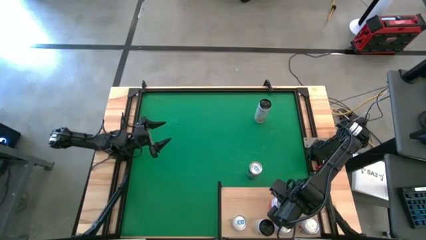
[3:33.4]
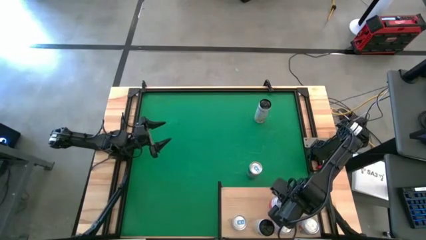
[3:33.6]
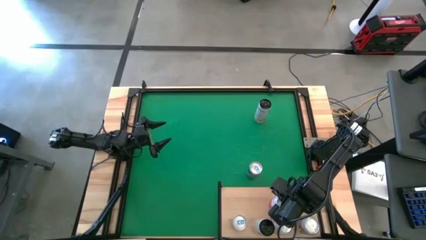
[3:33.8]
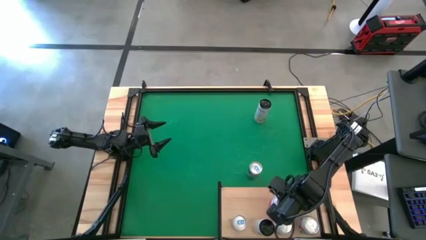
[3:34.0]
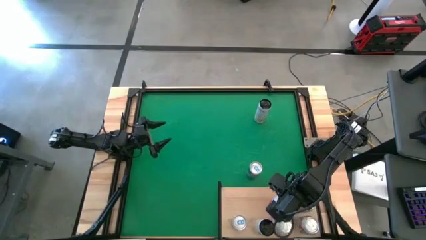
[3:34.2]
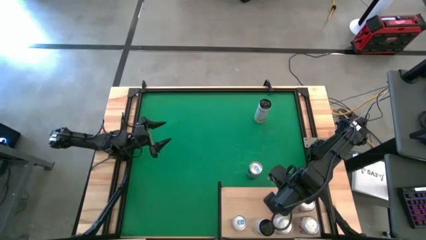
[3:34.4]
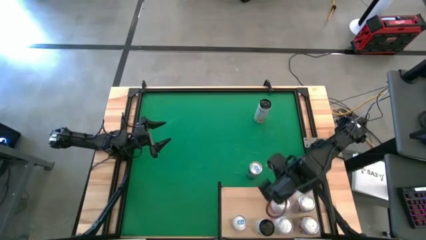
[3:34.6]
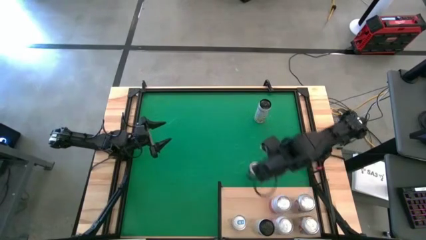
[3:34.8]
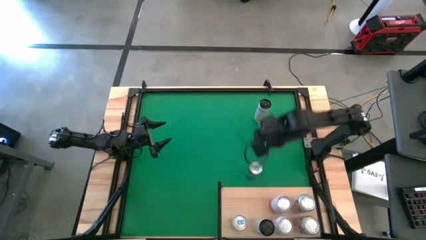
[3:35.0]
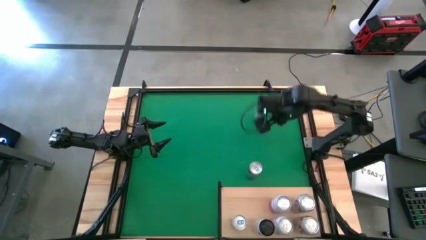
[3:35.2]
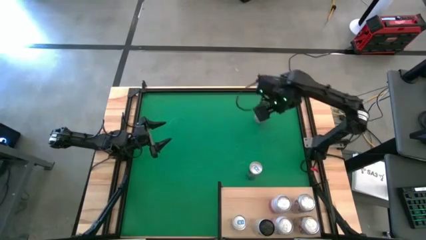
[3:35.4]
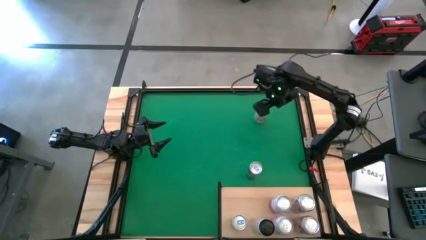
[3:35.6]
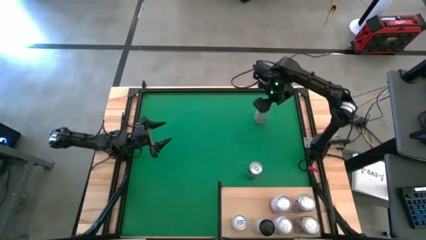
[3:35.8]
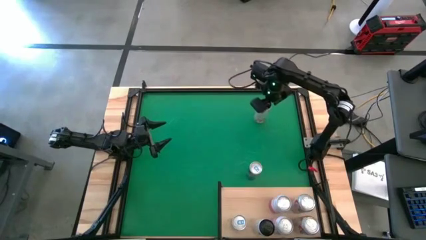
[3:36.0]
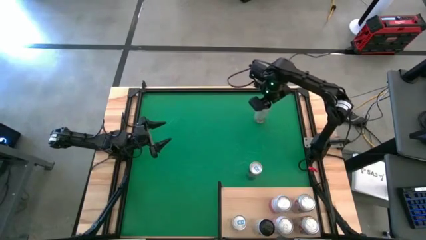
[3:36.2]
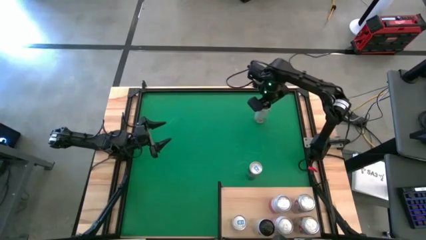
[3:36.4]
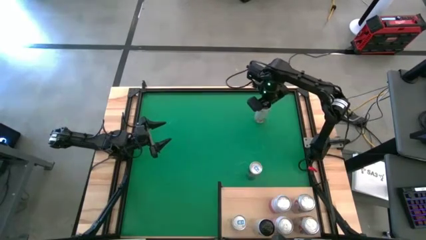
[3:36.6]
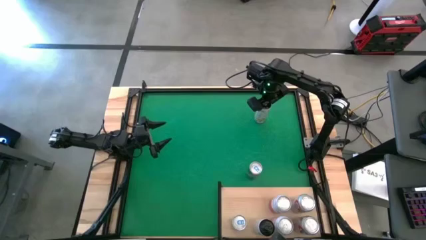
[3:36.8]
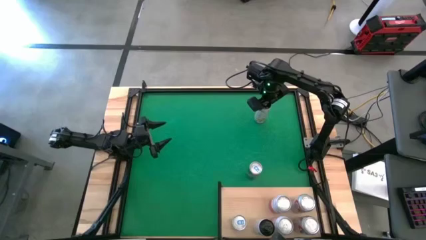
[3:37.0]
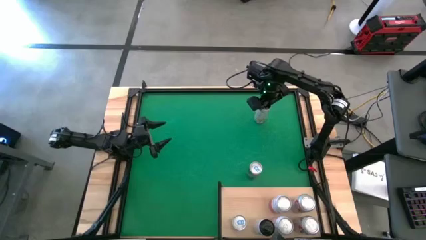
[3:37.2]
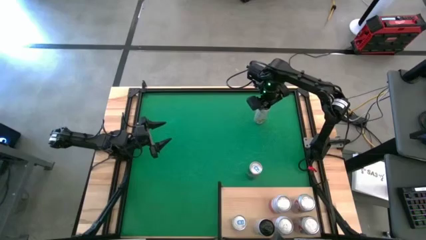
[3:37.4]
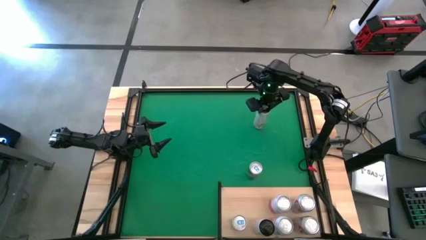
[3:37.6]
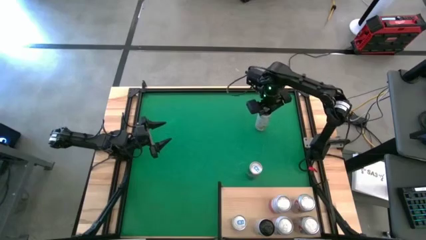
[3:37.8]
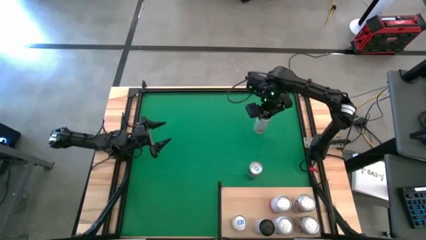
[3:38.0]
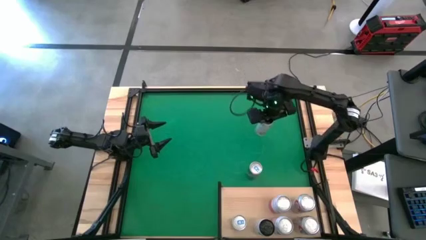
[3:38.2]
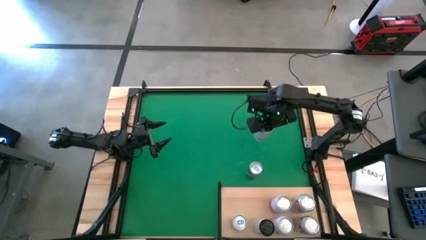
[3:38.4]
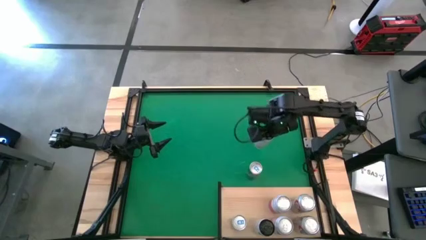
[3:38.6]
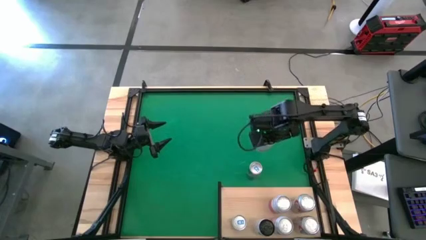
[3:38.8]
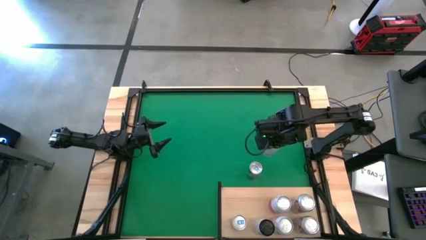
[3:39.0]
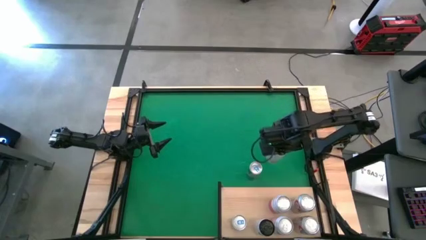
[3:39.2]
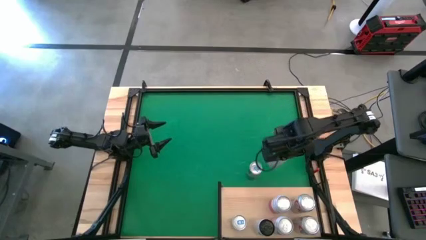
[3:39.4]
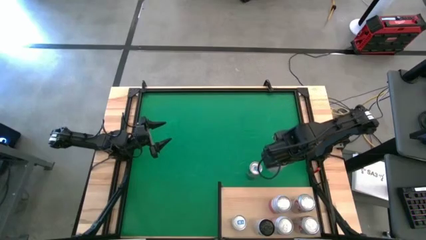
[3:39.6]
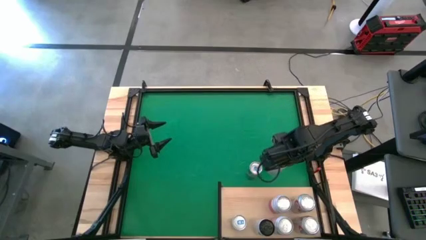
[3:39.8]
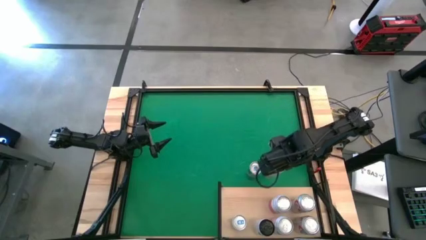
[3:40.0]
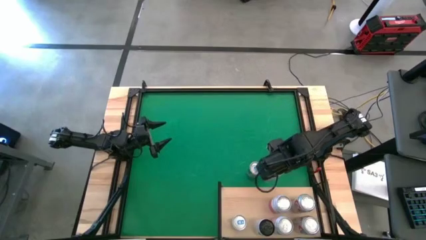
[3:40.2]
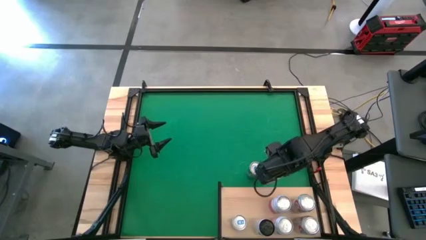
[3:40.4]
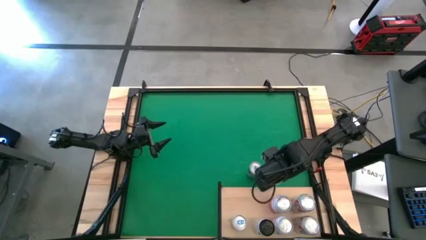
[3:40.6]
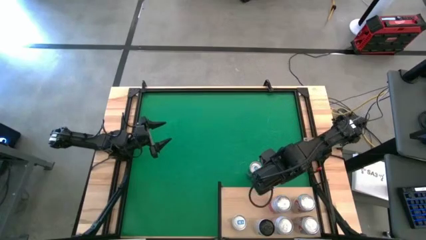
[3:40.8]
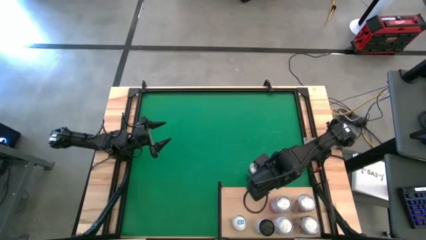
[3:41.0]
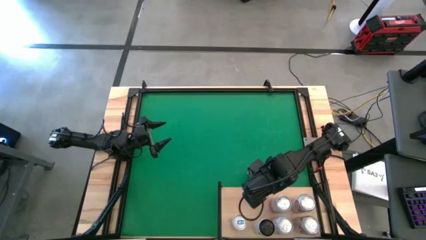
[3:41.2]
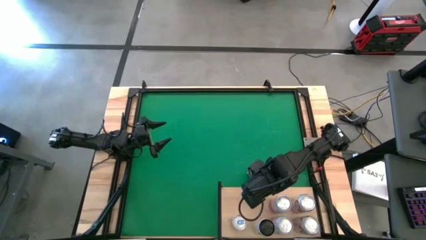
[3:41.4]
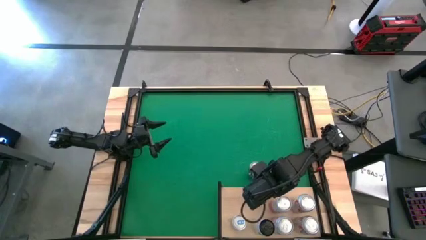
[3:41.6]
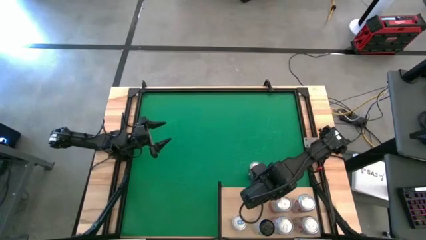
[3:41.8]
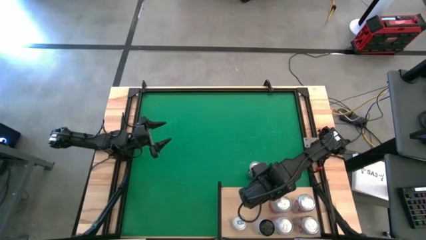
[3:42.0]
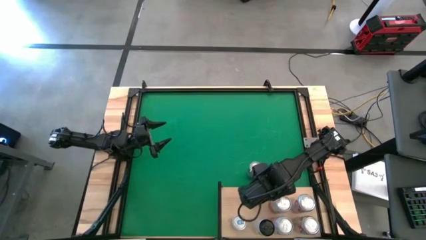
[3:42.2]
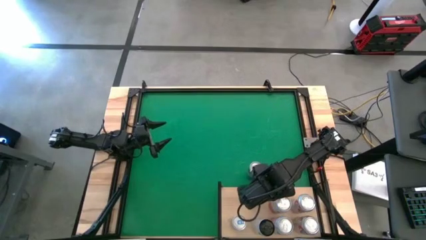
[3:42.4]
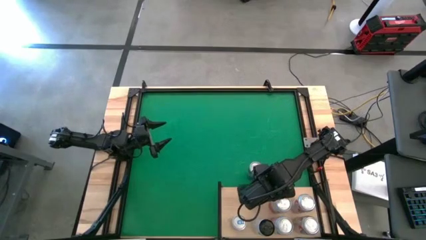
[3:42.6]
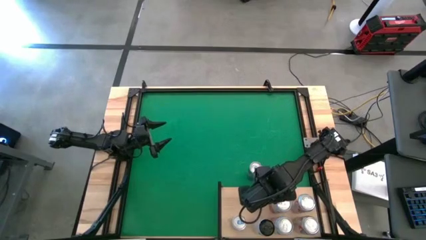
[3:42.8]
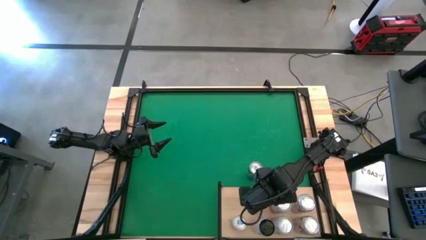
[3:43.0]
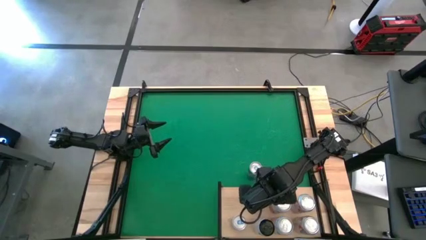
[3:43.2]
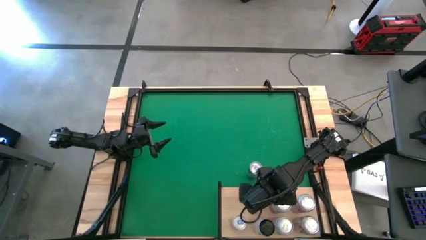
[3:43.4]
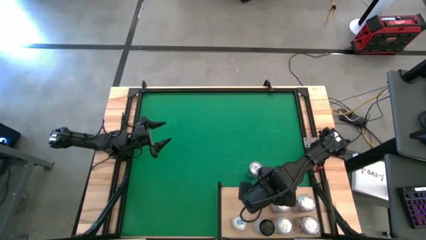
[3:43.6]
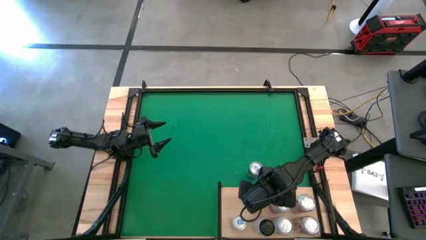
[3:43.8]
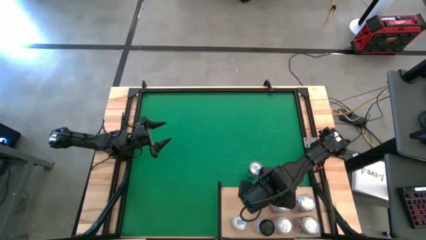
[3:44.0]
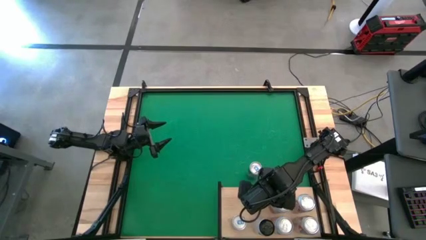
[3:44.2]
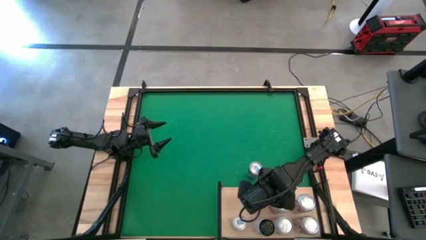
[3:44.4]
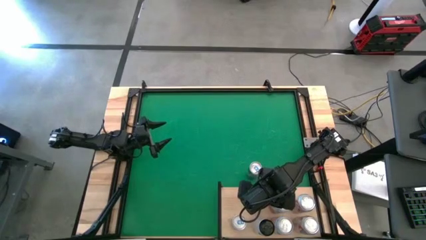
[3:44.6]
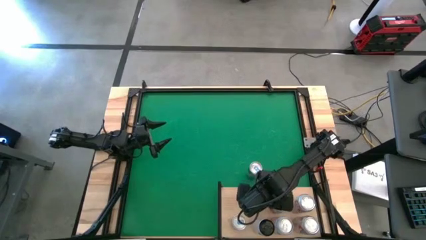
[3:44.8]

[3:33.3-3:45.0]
Task: Place canned beverage on shelf
Put the white-yellow soda can aligned with the white-yellow soda can on the shelf

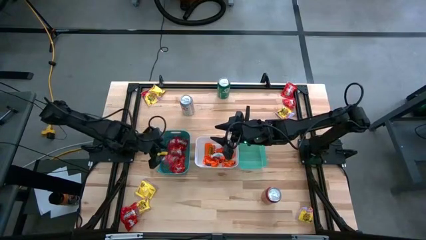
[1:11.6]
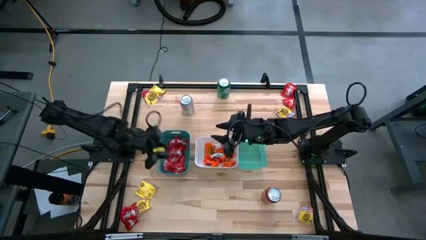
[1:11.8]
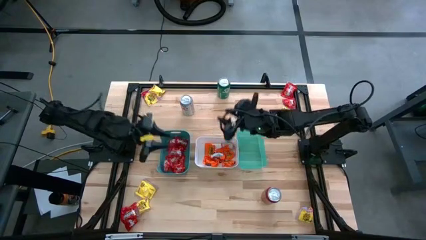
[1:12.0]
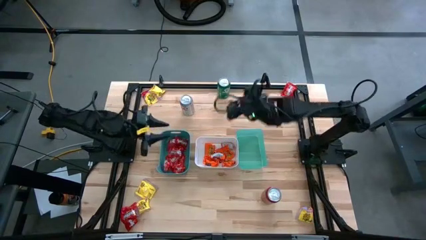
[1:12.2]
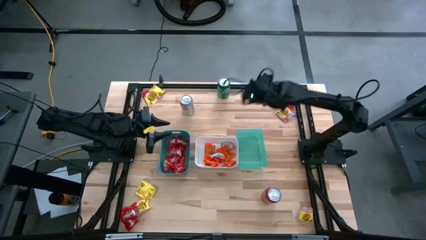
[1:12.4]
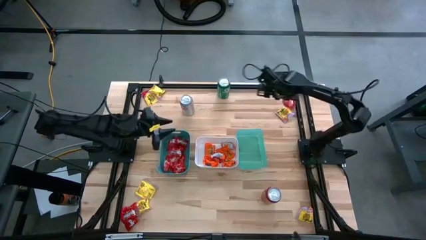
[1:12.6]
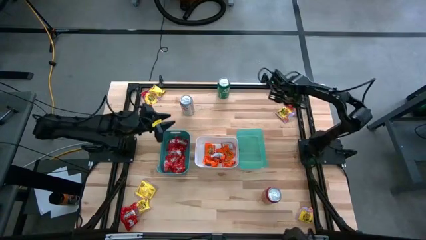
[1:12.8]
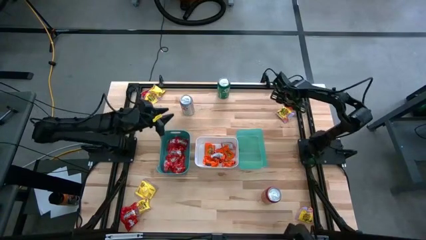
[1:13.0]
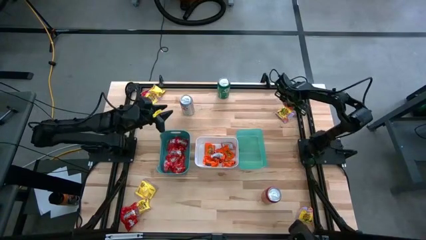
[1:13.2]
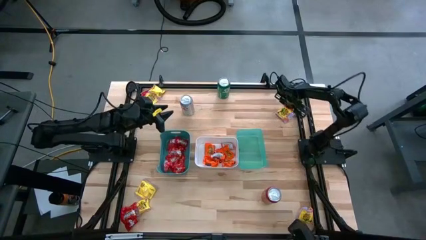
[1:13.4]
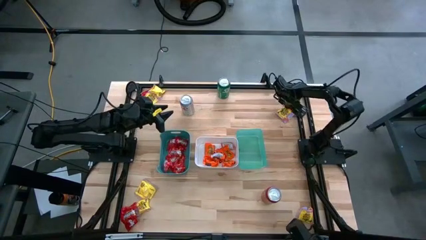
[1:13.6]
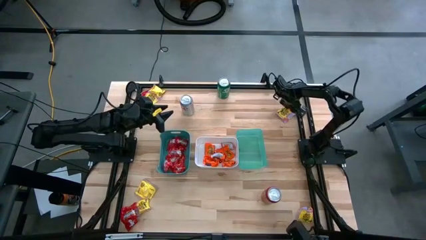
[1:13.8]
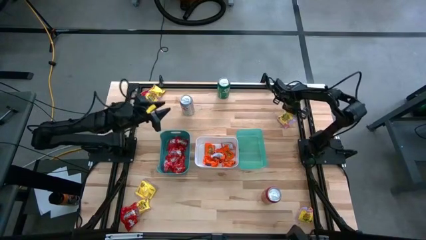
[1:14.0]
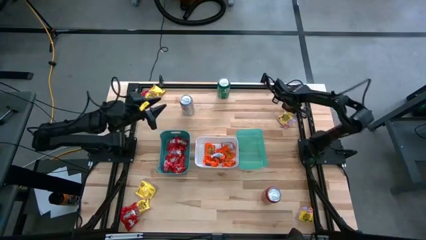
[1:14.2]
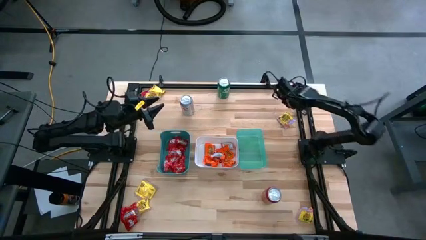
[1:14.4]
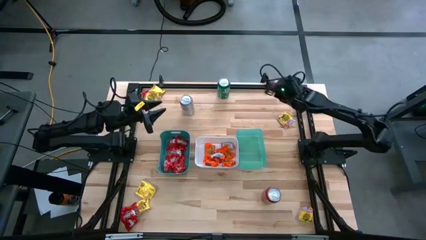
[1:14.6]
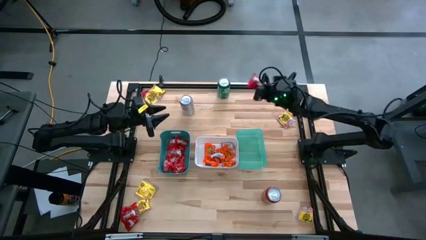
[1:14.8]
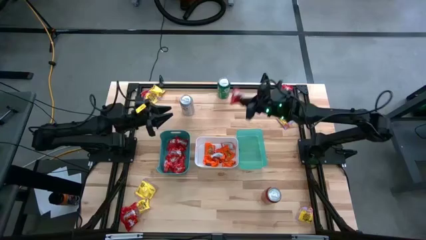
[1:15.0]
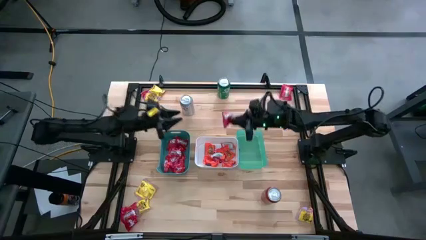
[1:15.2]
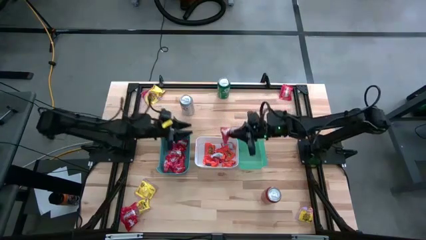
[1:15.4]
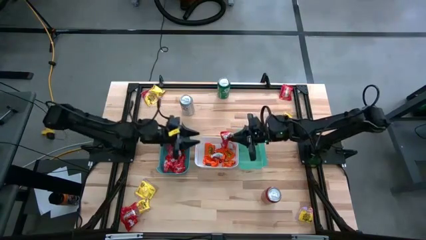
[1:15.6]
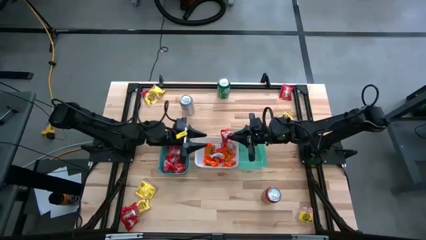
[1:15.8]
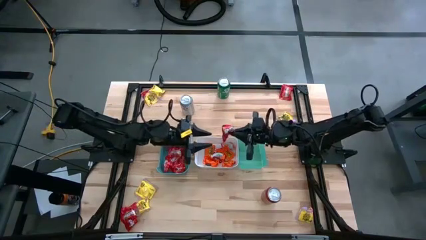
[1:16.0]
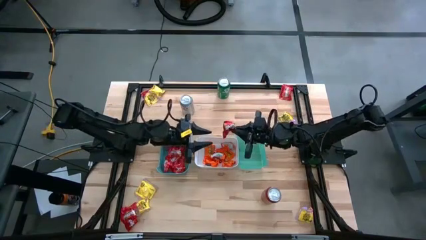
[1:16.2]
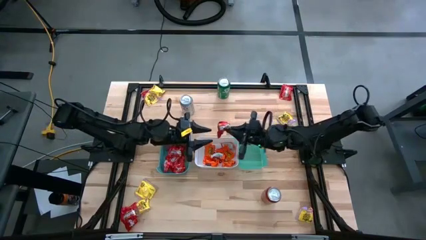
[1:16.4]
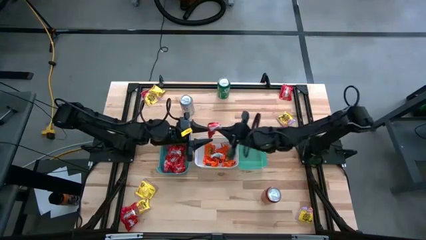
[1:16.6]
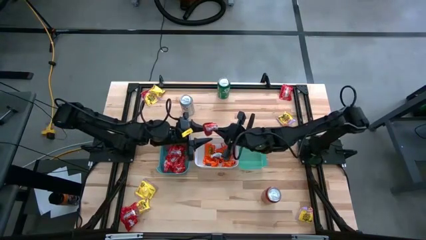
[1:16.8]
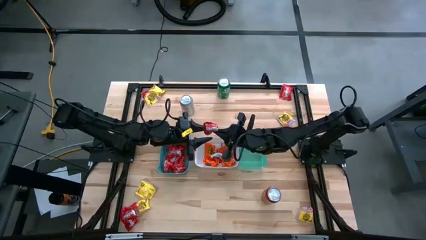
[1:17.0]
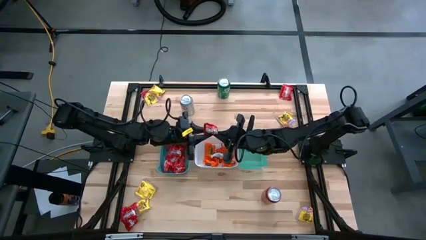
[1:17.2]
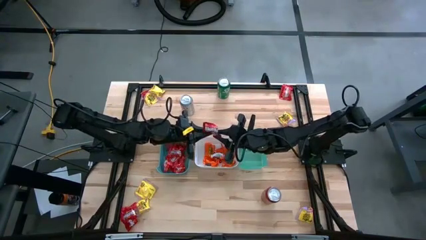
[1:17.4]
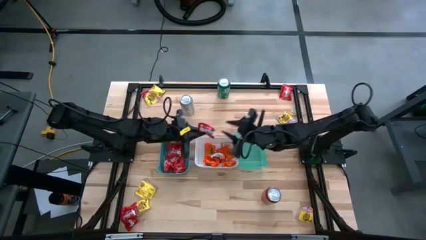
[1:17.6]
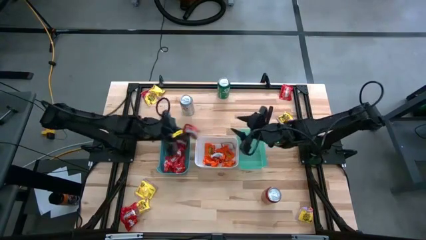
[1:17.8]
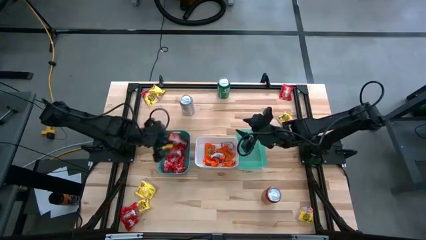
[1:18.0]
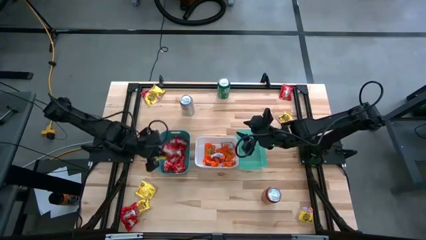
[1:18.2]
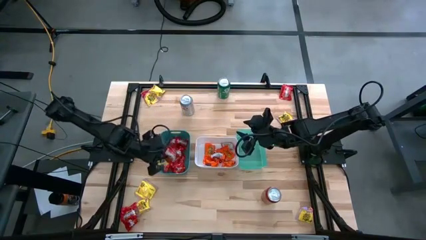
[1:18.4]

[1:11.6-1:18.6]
Task: Sort candy
Put the red candy into the green bin
